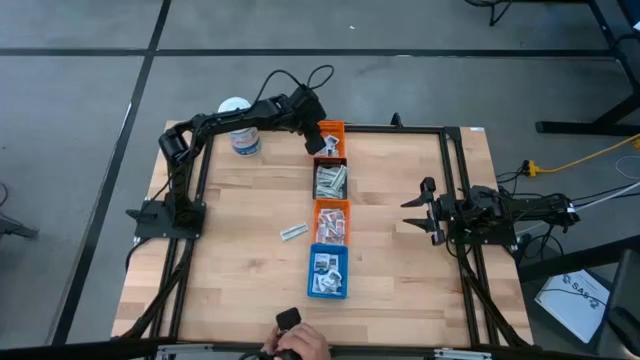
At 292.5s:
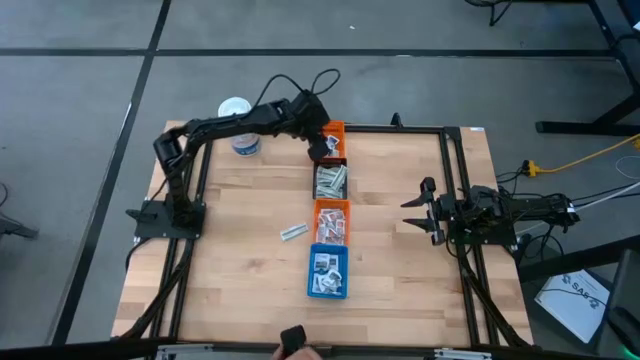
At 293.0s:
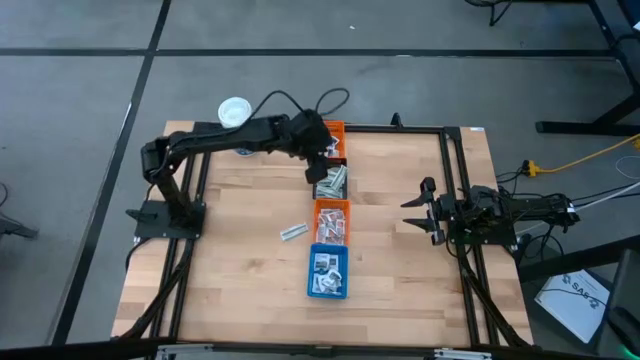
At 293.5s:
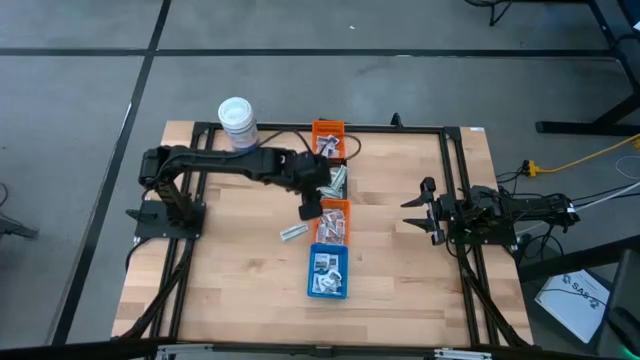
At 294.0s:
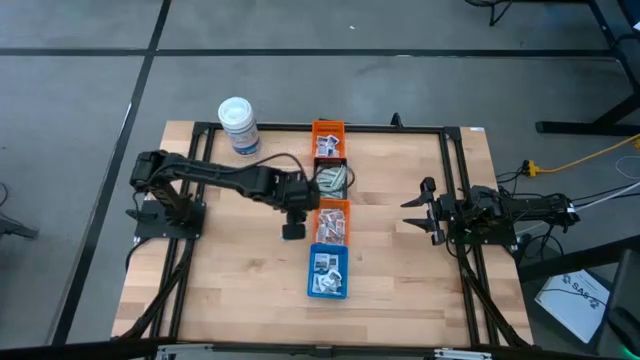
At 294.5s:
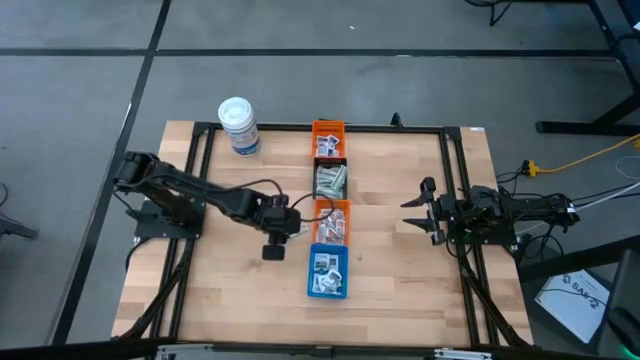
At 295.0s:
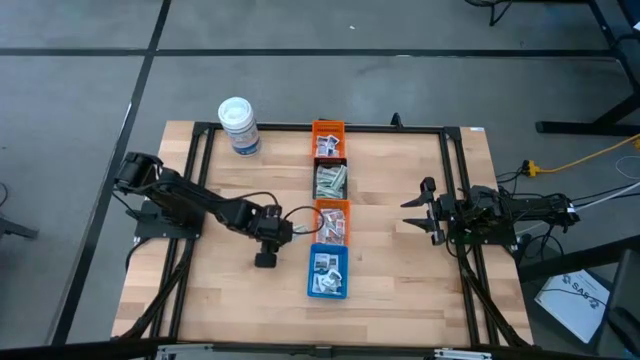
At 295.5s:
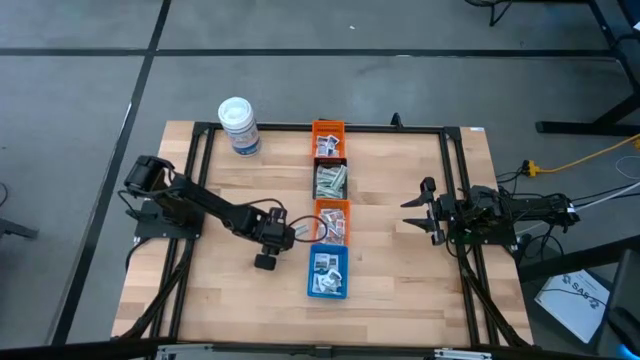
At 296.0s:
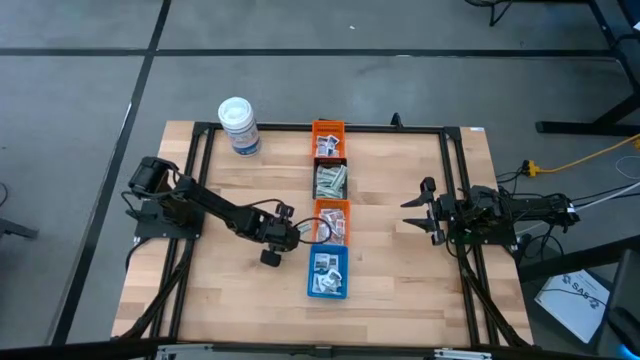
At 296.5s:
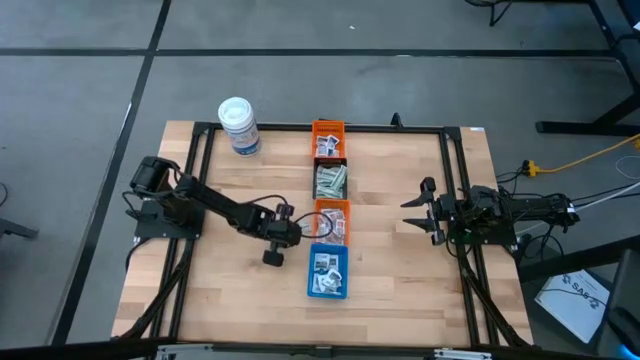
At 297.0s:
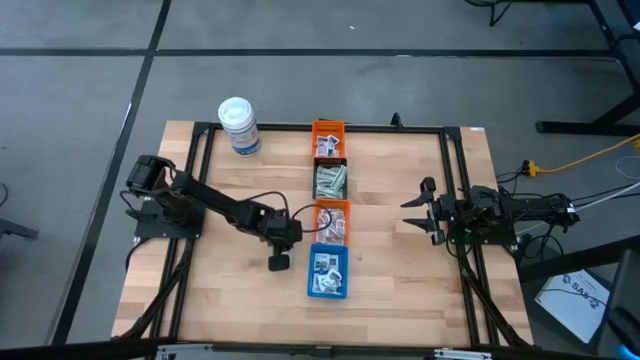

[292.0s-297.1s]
Task: Pick & Place First Aid Supplies
Put the green bandage into the black bin

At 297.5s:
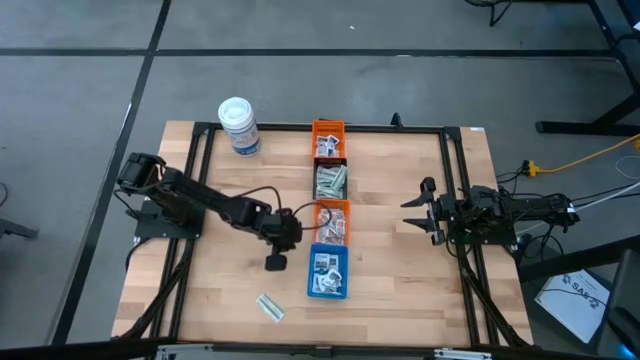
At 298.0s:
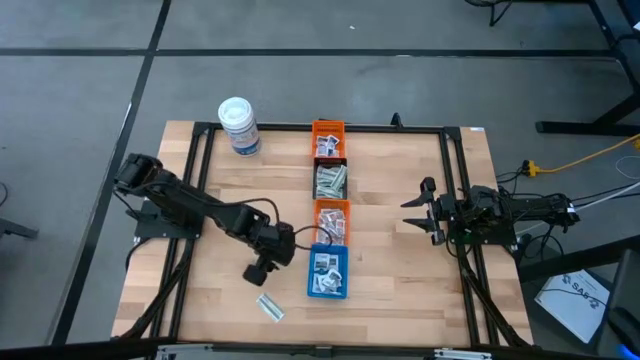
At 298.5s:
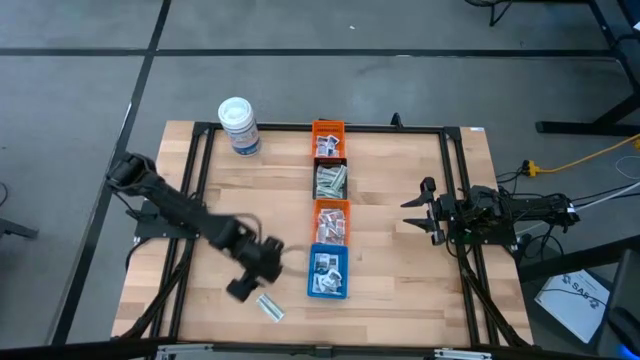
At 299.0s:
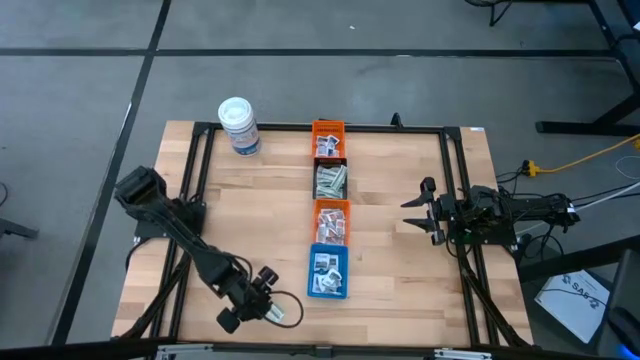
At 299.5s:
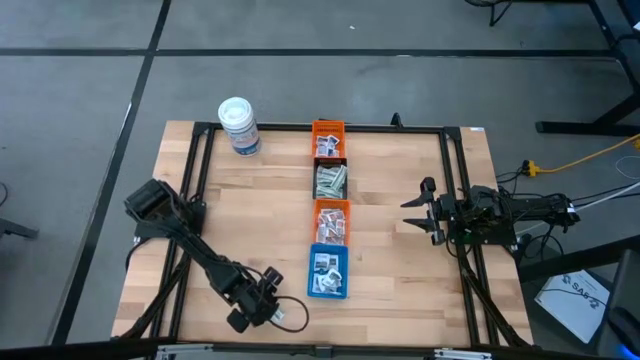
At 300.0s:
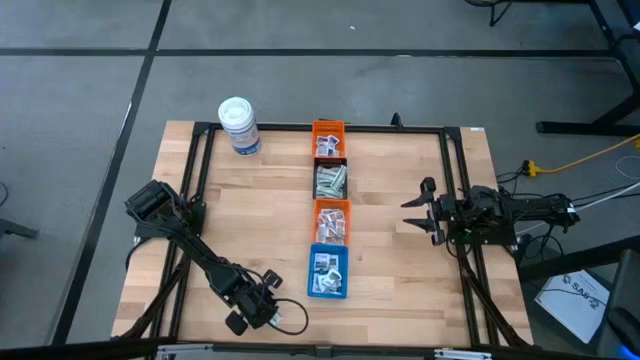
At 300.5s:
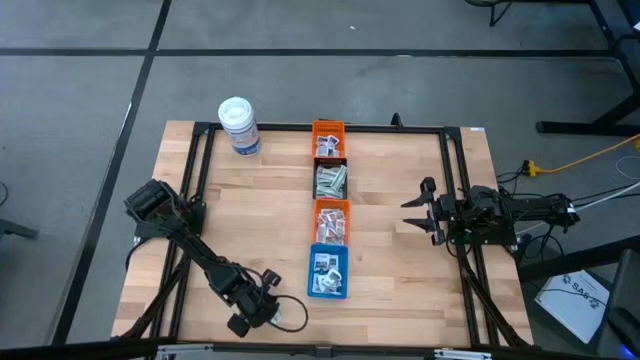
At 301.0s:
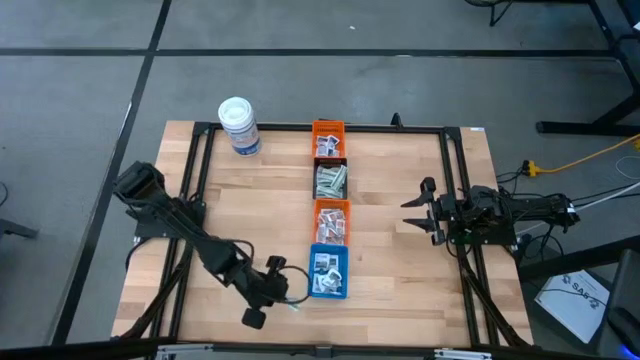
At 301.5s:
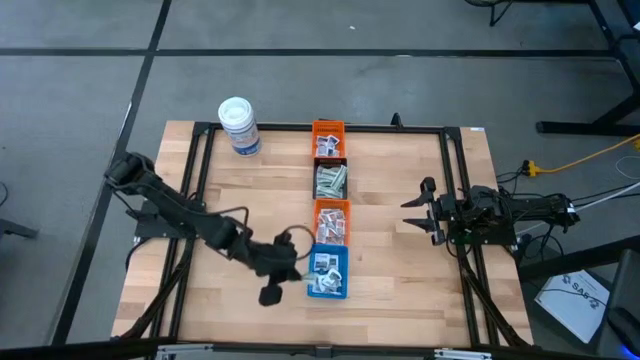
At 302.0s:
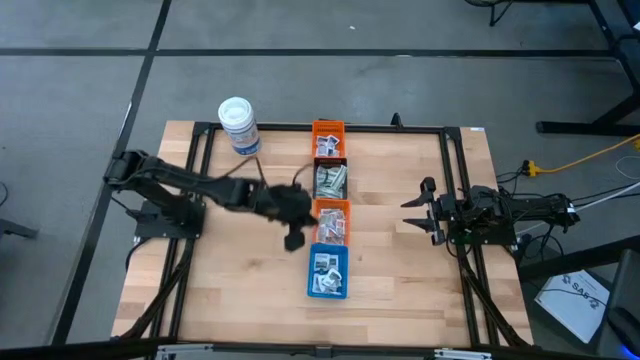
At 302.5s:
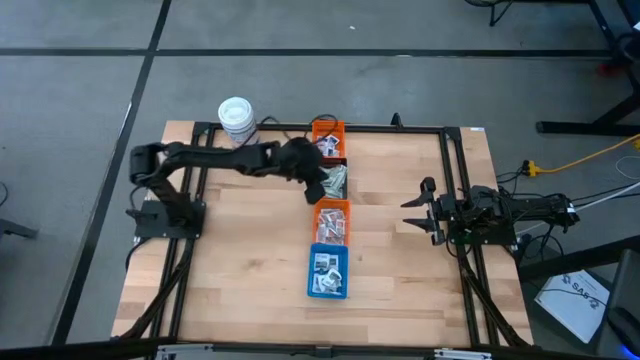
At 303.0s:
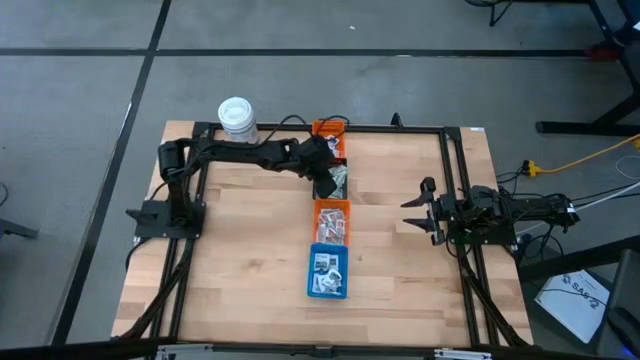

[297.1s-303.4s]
Put the green bandage into the black bin

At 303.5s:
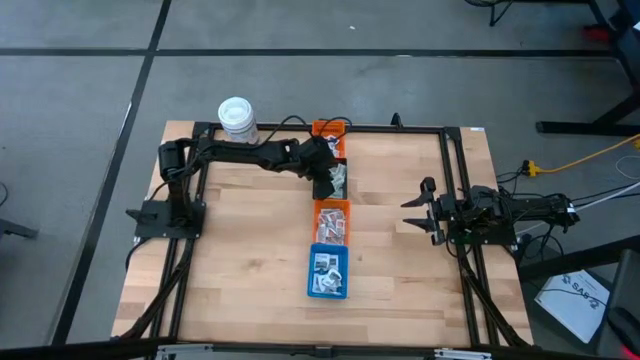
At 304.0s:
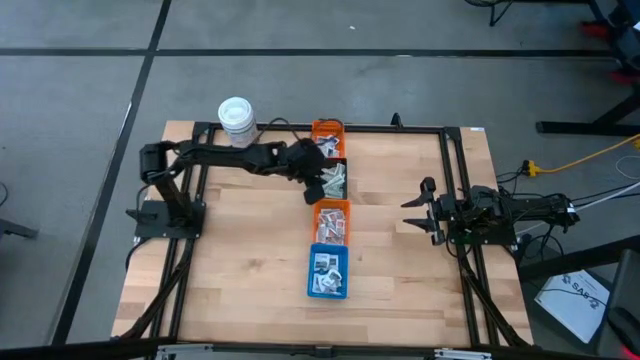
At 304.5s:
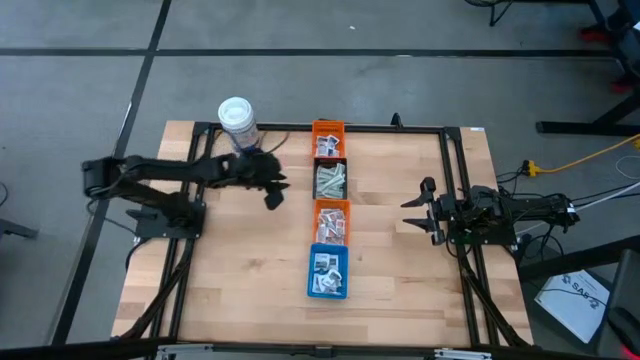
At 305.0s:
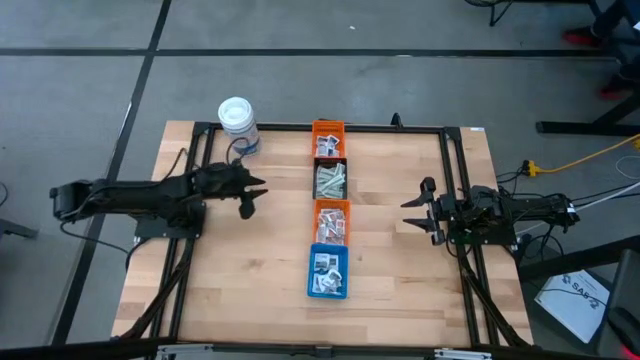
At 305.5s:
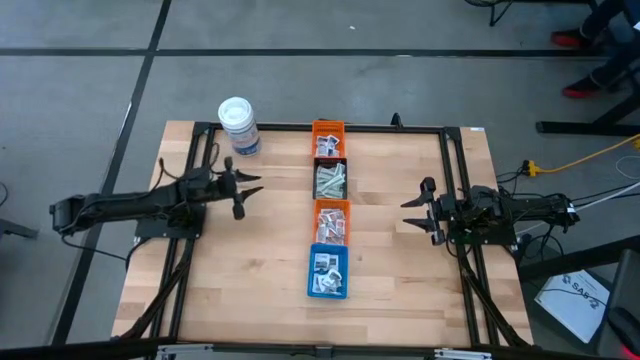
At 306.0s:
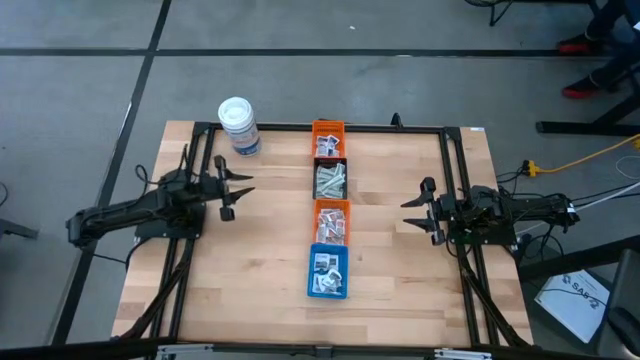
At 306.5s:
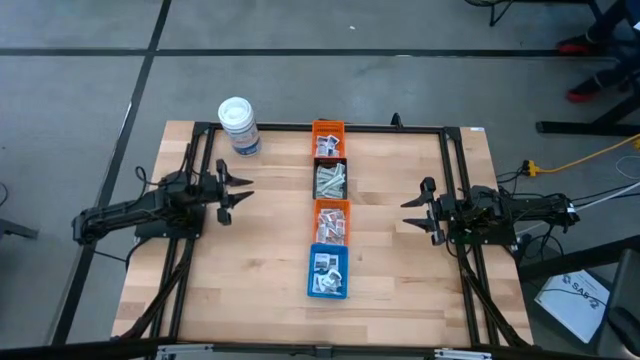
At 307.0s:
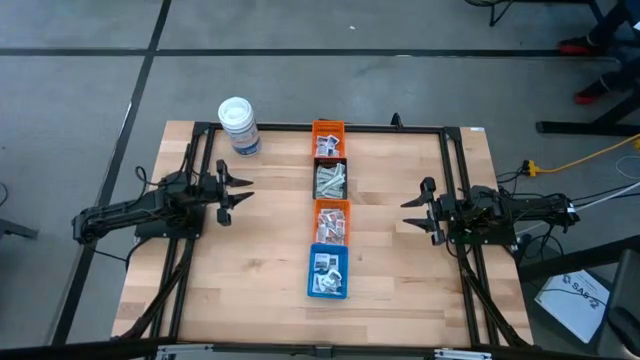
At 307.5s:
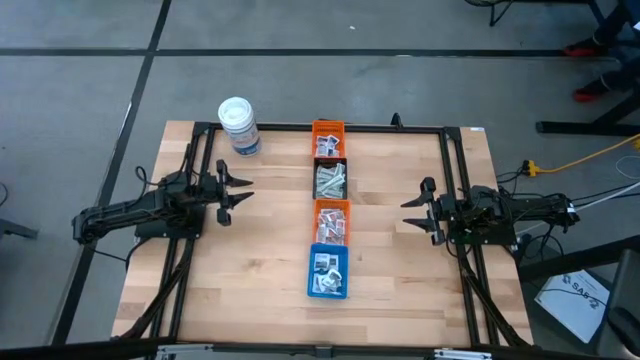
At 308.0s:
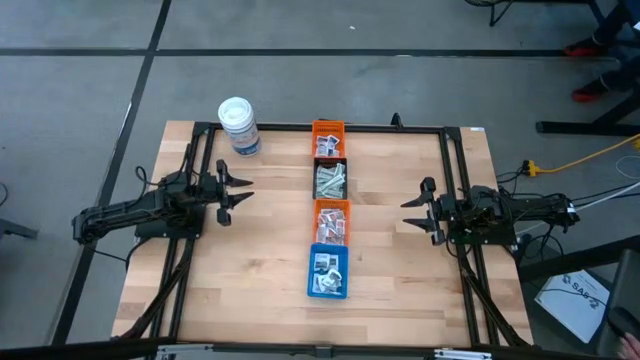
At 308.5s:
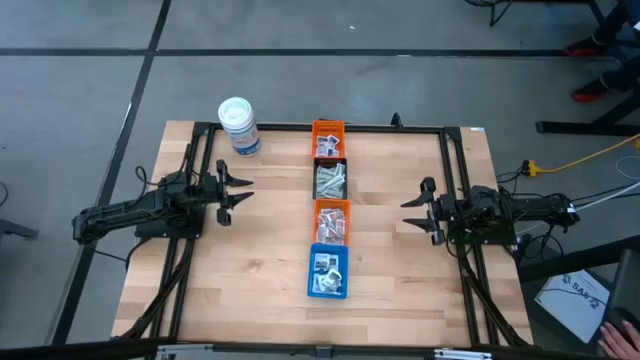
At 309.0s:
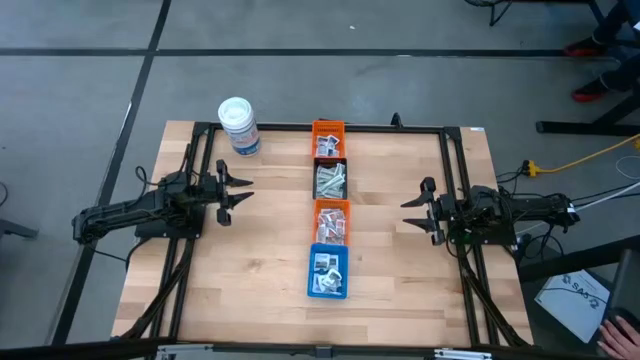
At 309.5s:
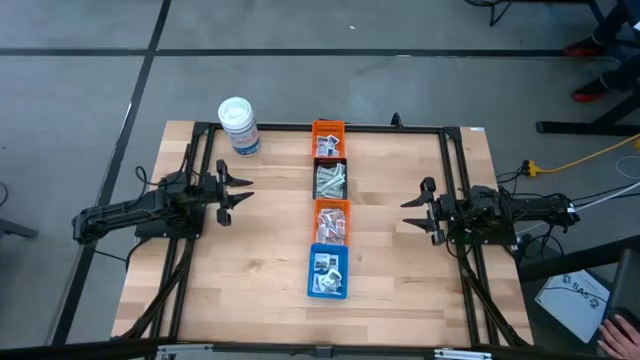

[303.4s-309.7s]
Return to Home Position

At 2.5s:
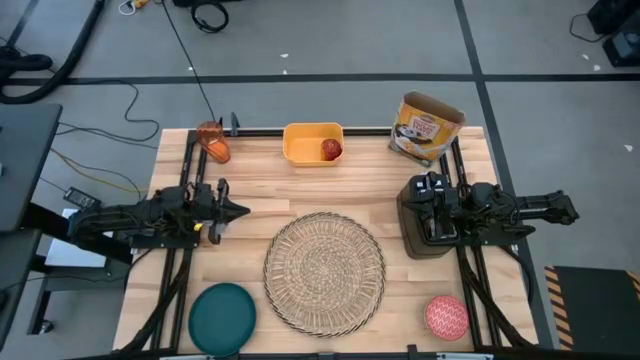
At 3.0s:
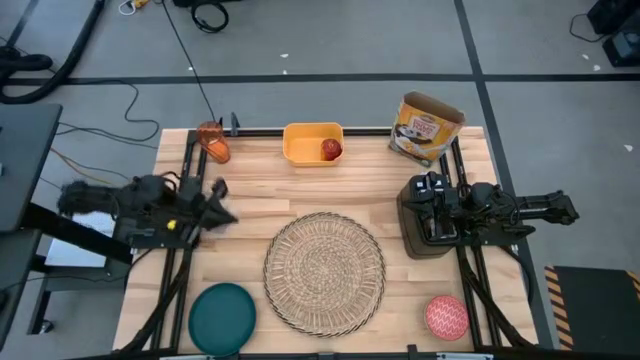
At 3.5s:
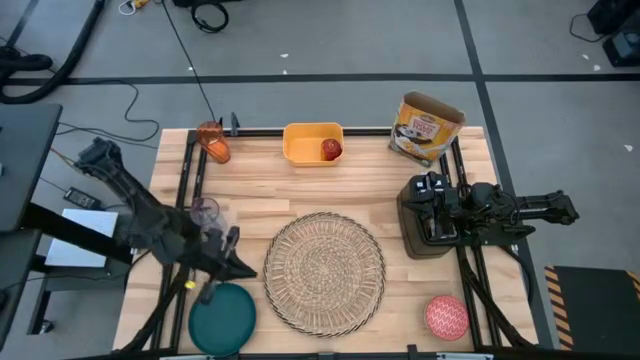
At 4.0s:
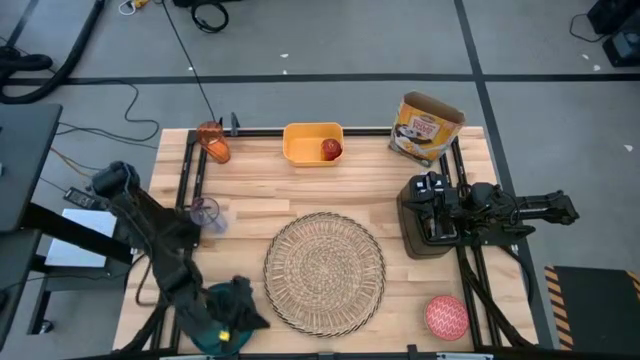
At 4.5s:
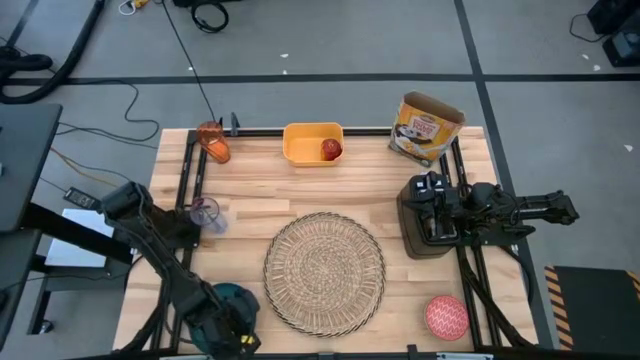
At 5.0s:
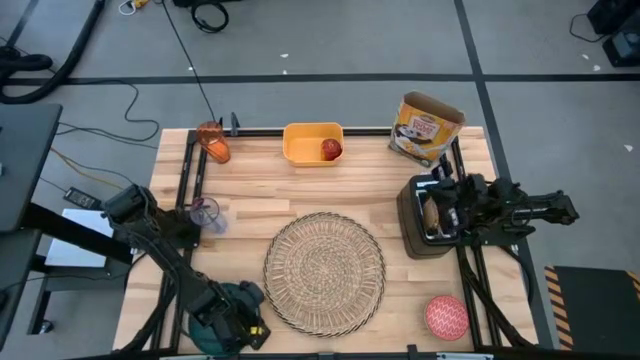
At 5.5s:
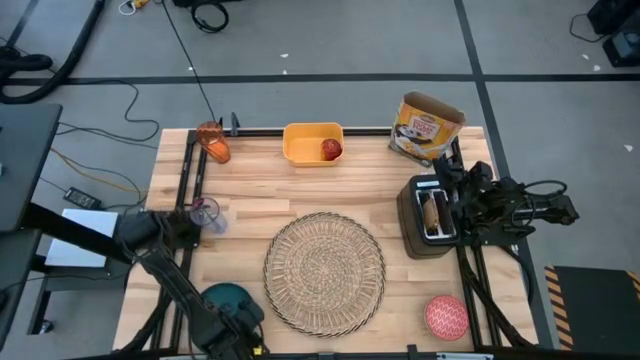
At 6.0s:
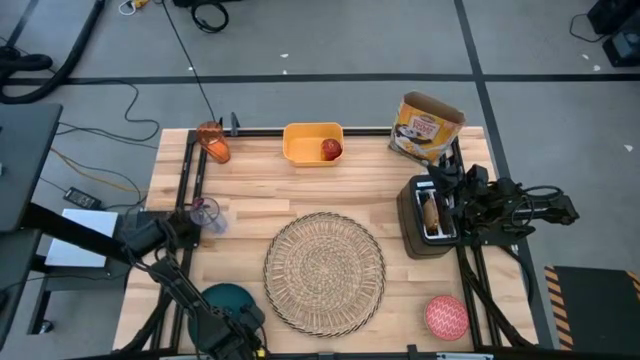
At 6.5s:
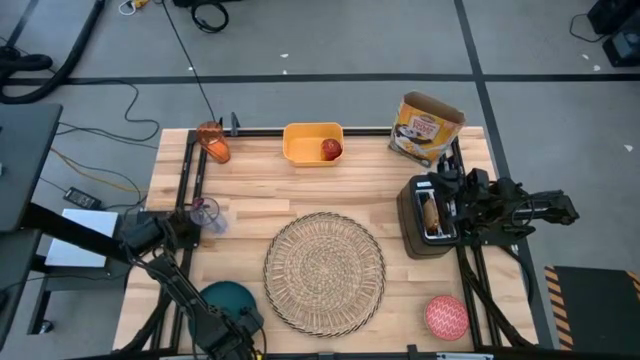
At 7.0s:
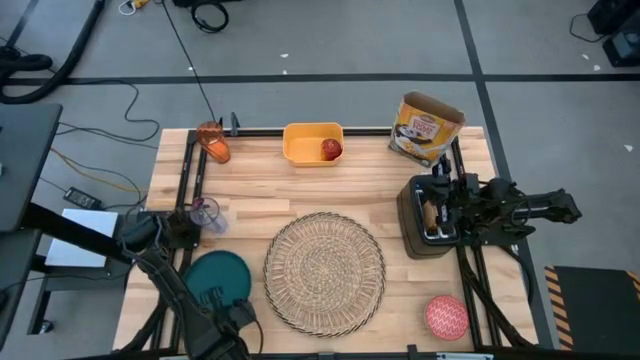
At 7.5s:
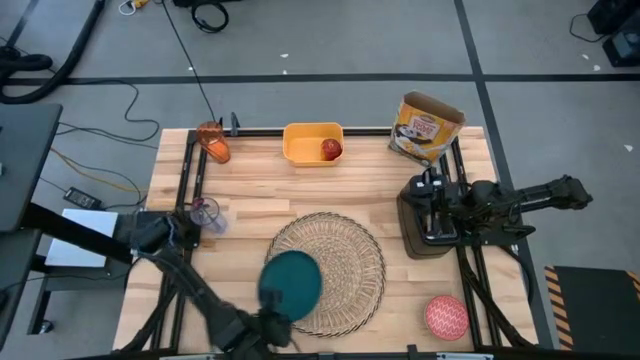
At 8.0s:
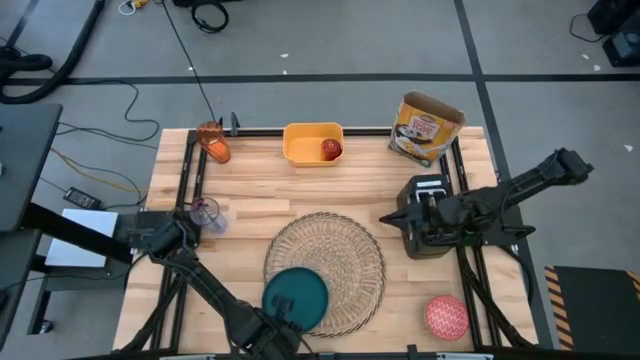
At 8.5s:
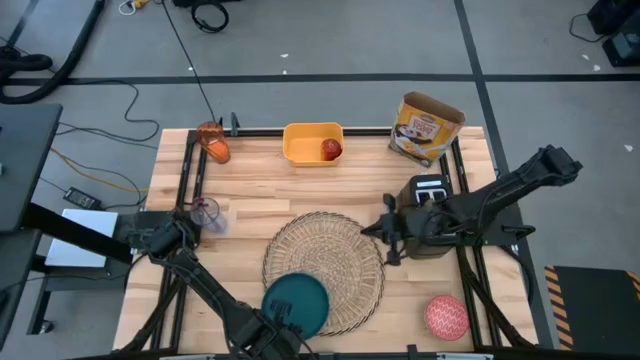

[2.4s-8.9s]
Task: Arrange a breakfast setting
Put the dark green plate on the left side of the brown table mat
